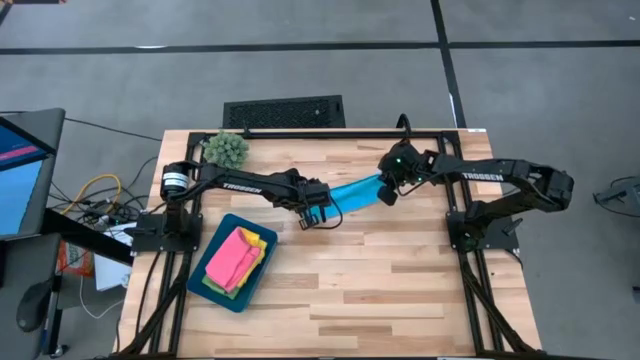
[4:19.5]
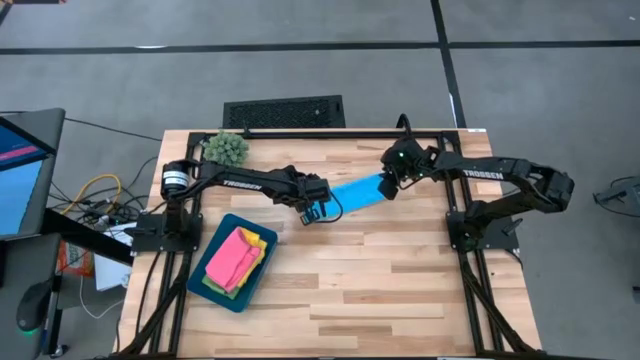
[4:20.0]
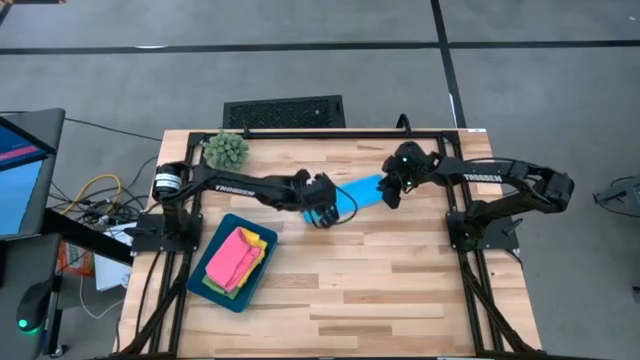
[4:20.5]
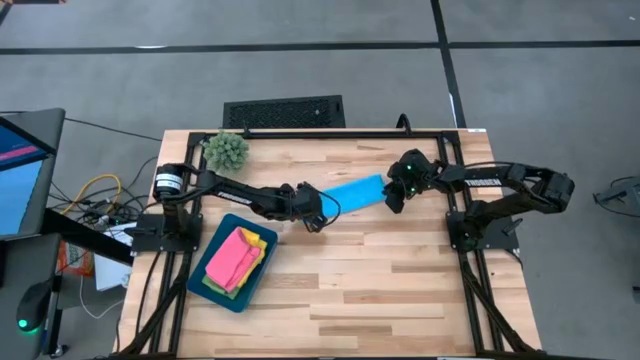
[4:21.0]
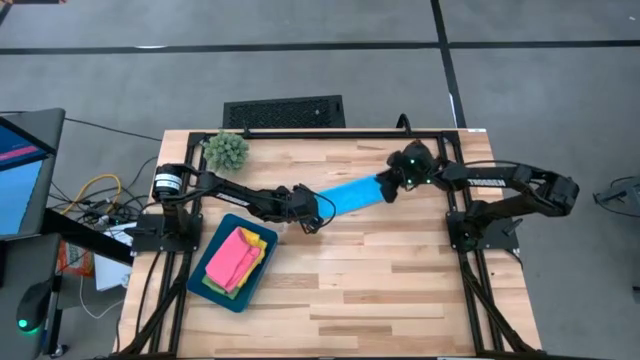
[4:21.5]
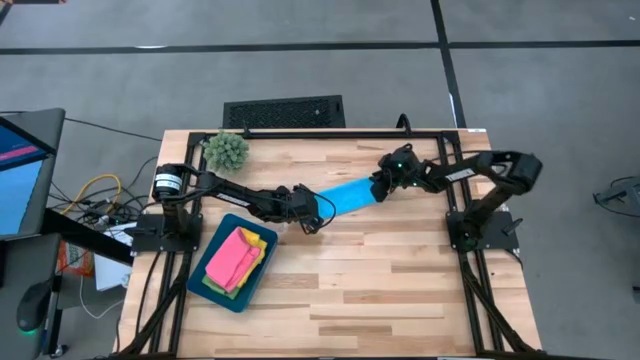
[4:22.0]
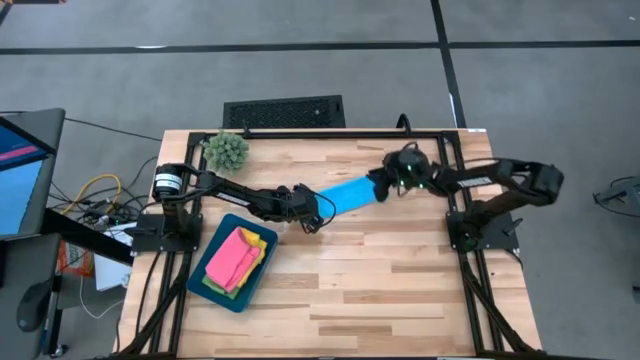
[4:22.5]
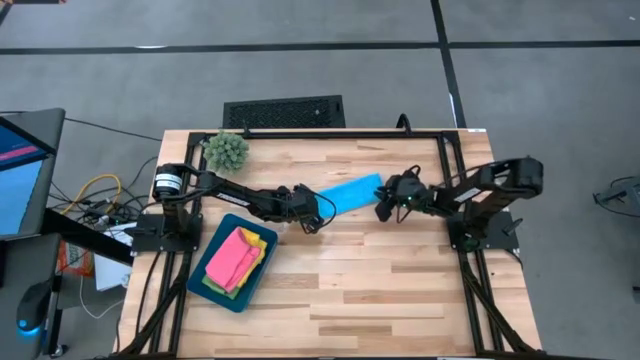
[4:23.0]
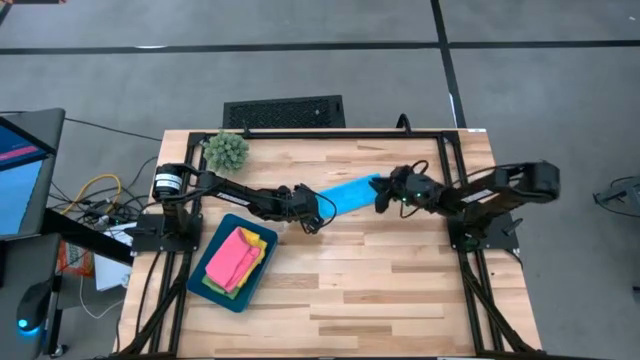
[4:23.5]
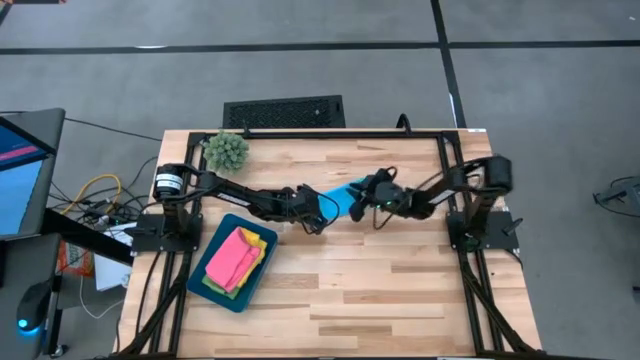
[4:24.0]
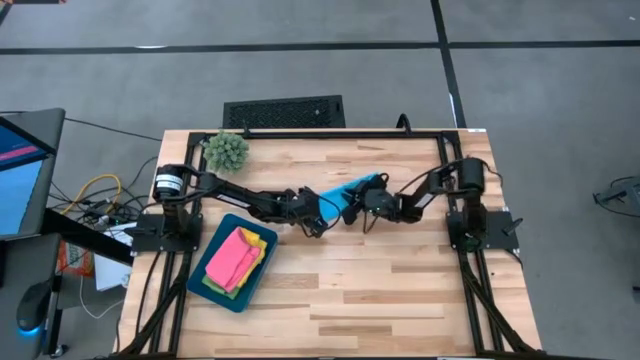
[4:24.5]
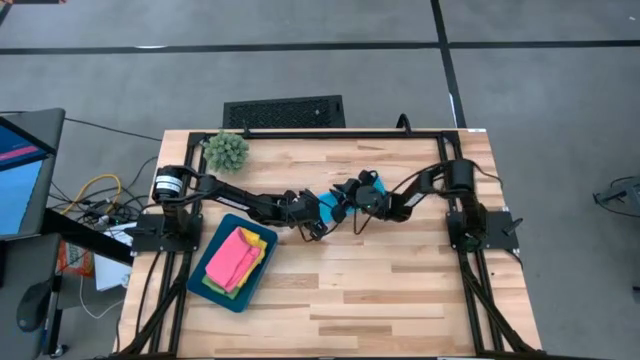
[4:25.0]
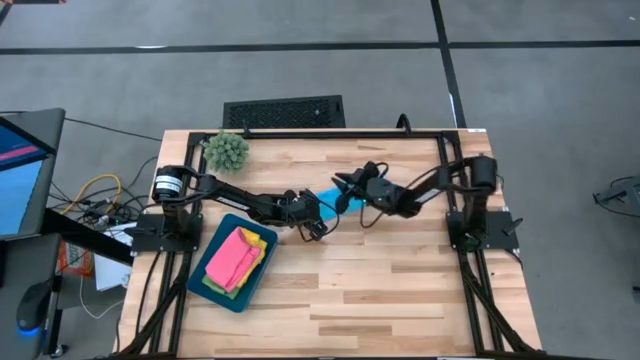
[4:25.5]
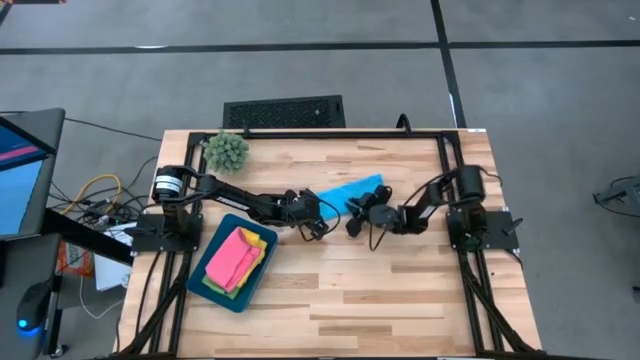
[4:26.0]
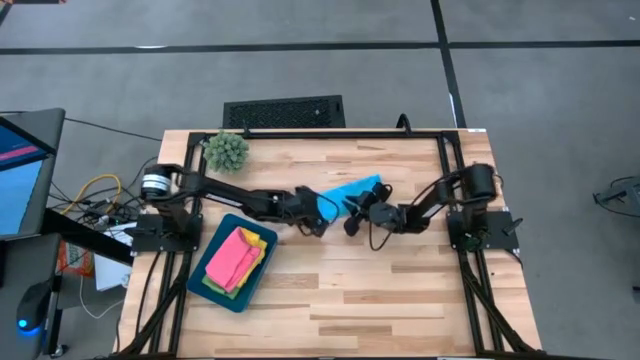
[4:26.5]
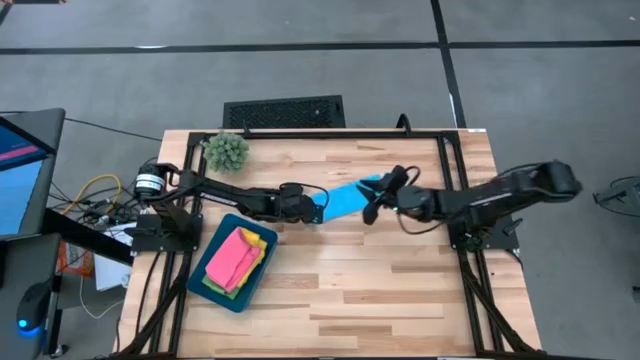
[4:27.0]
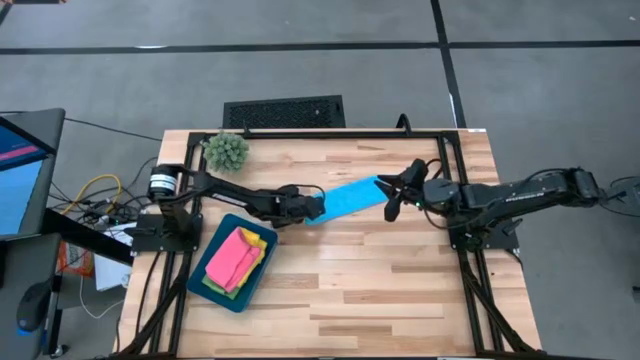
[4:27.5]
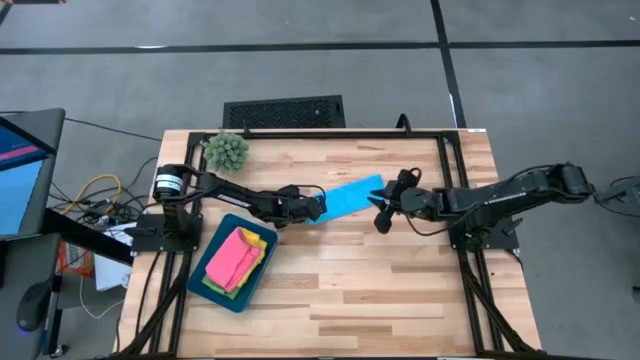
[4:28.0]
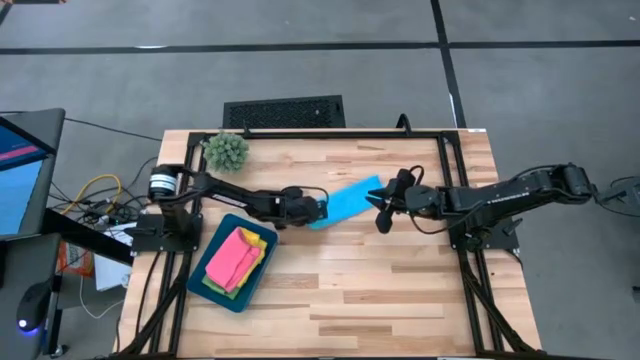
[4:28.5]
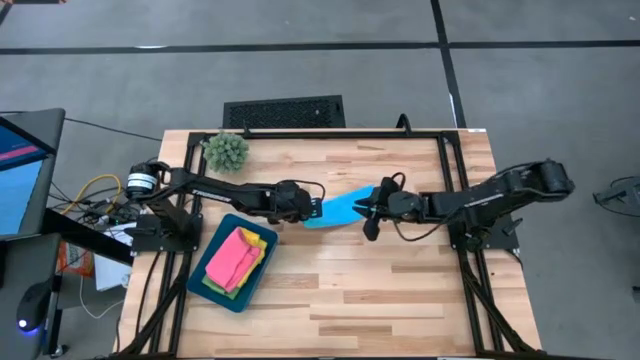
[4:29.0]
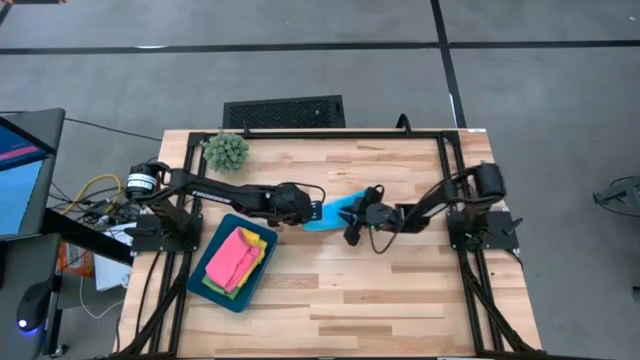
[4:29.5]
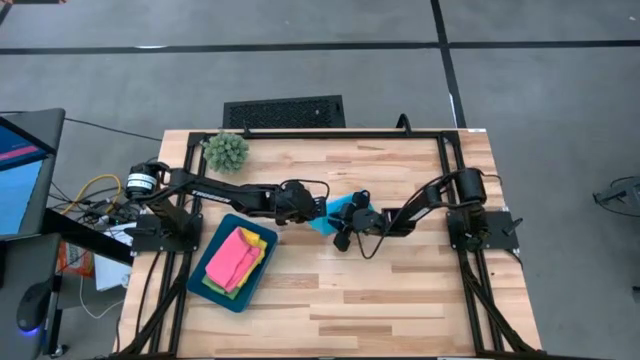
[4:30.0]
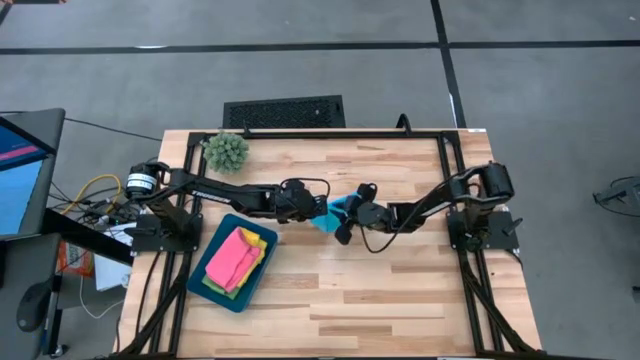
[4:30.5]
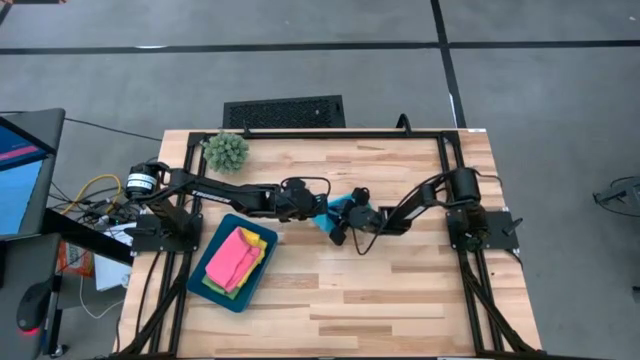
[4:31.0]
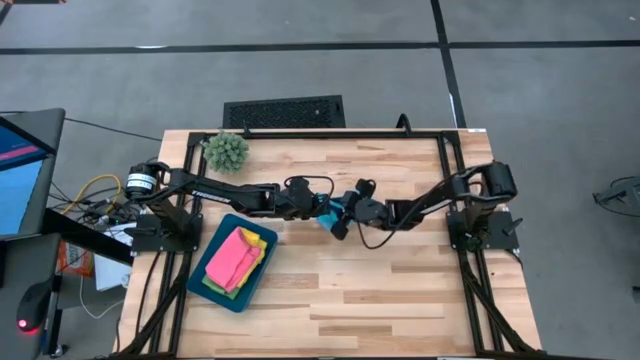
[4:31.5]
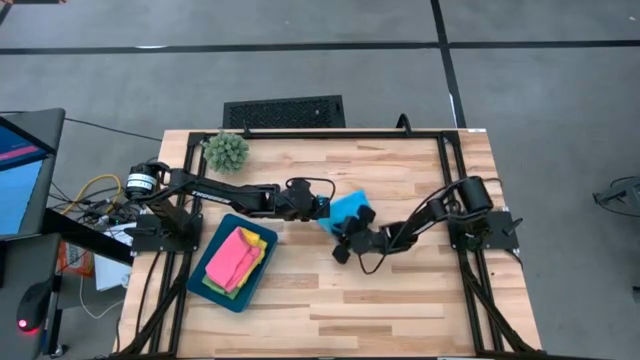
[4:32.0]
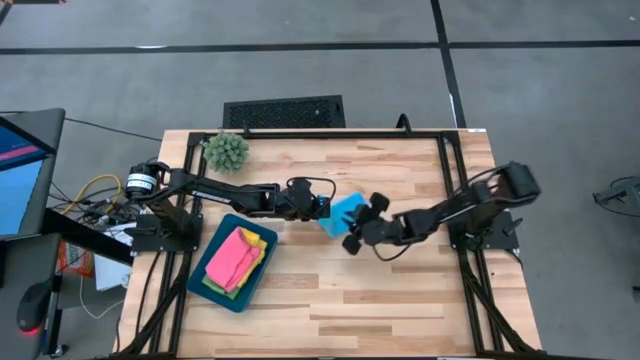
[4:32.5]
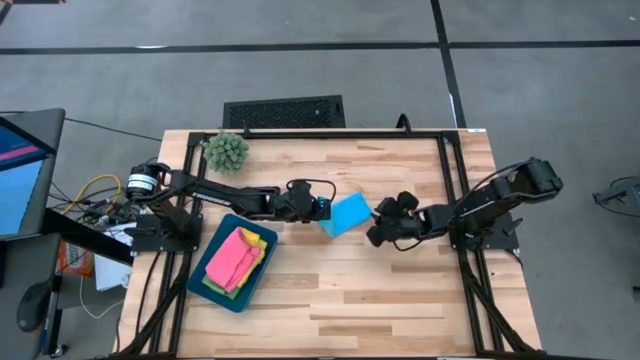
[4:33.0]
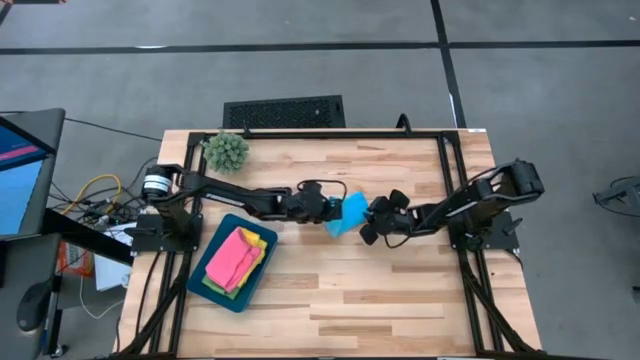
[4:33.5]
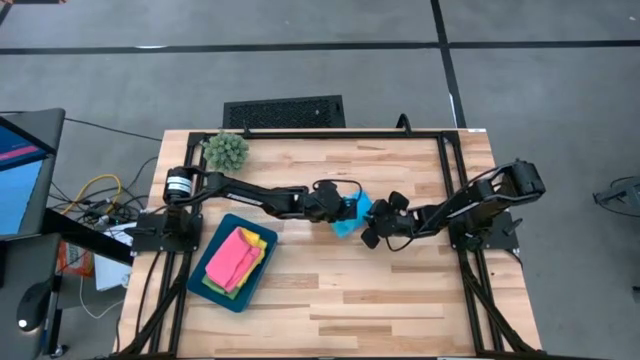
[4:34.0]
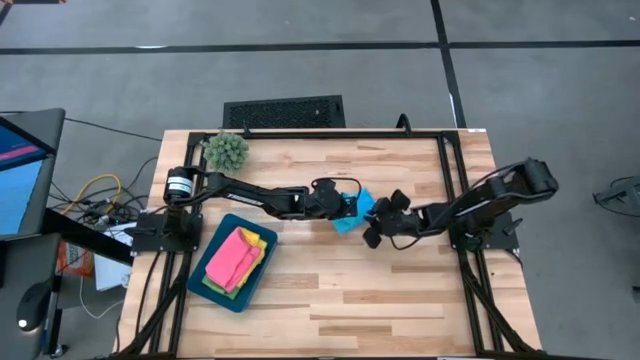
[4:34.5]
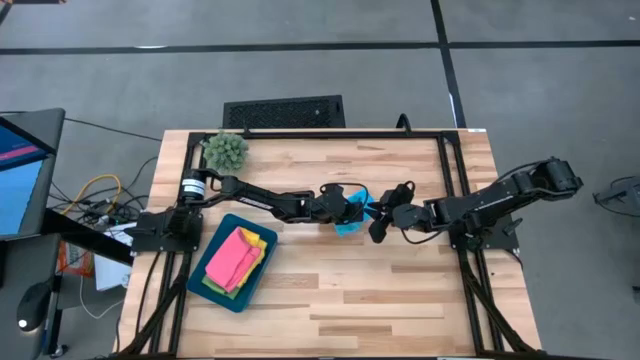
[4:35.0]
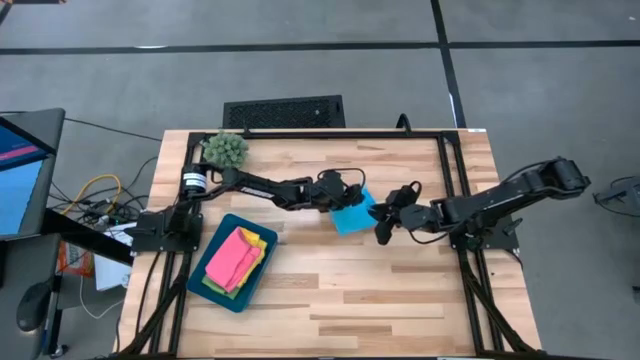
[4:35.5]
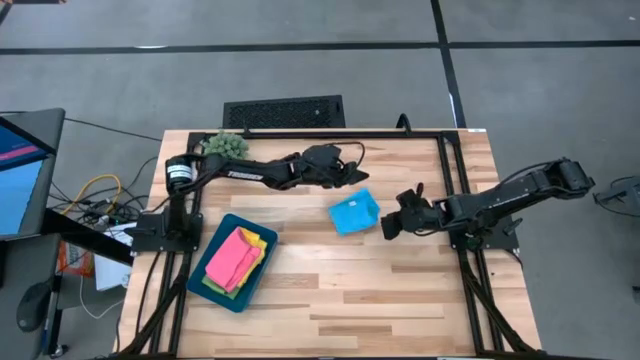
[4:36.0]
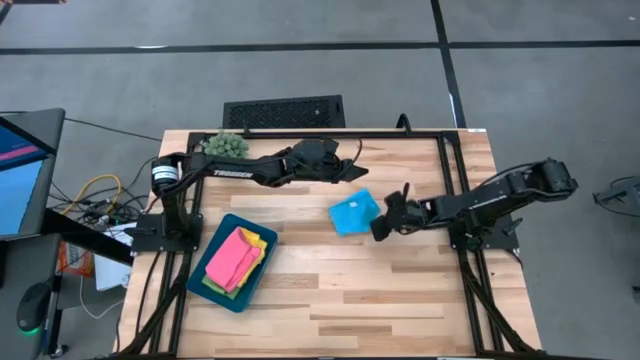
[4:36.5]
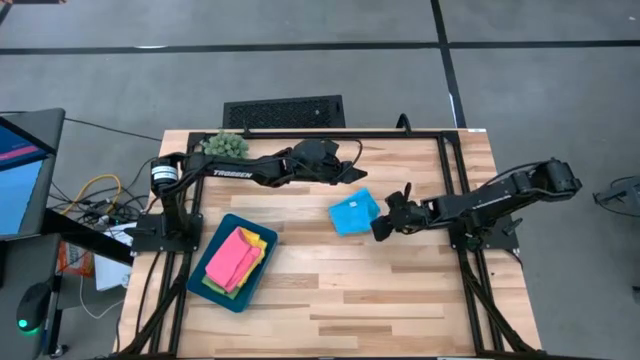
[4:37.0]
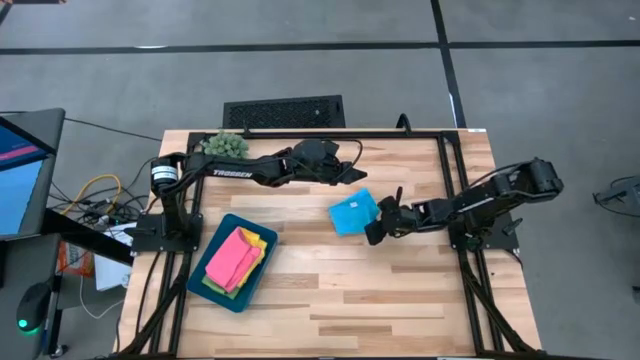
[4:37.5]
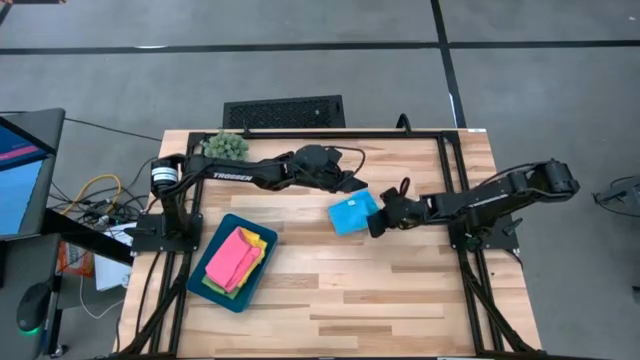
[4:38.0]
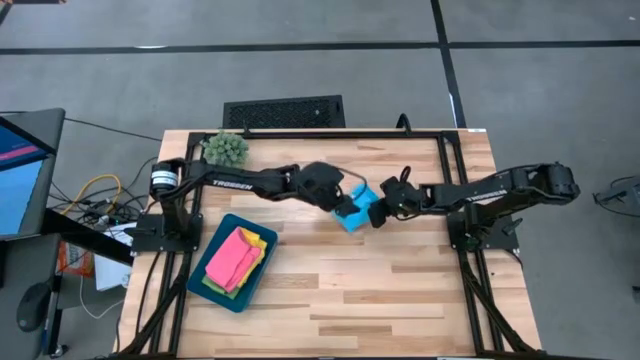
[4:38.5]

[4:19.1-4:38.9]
Task: Fold microfiber towels
Fold the blue microfiber towel

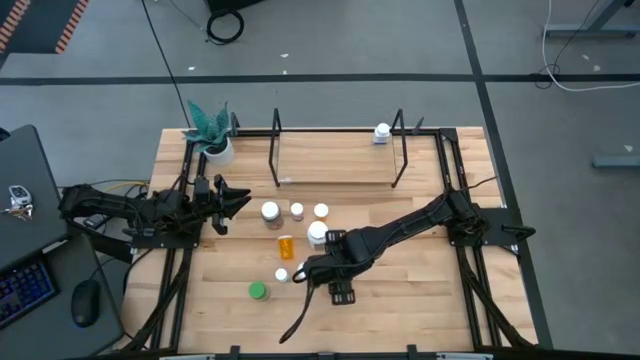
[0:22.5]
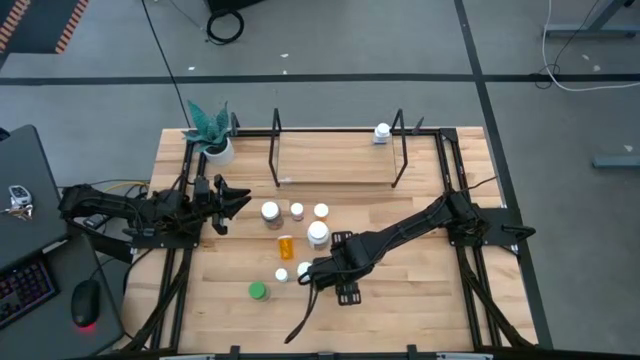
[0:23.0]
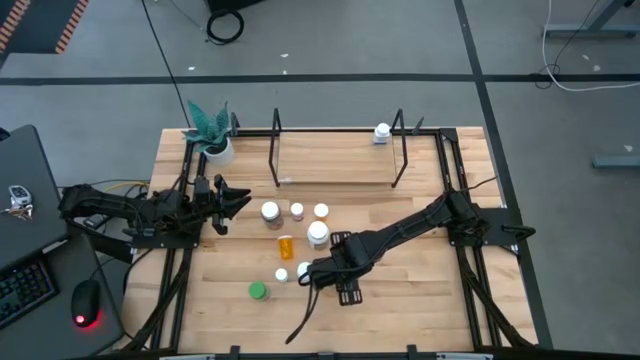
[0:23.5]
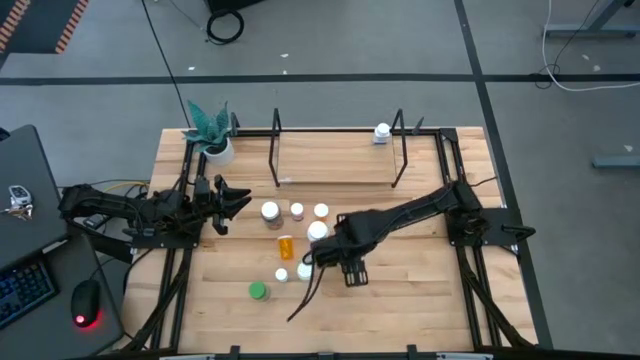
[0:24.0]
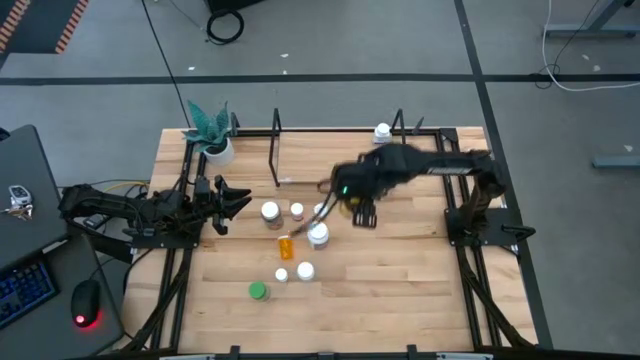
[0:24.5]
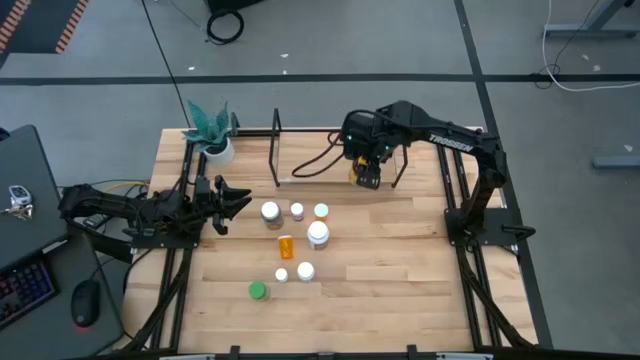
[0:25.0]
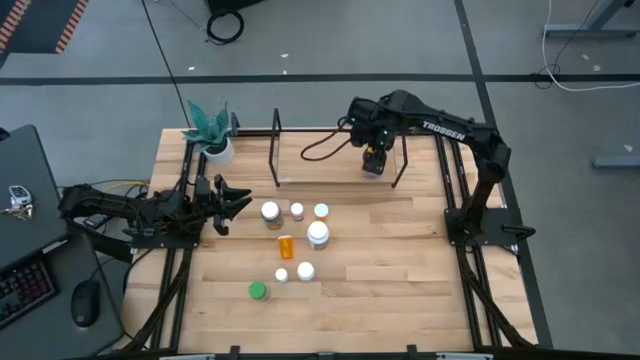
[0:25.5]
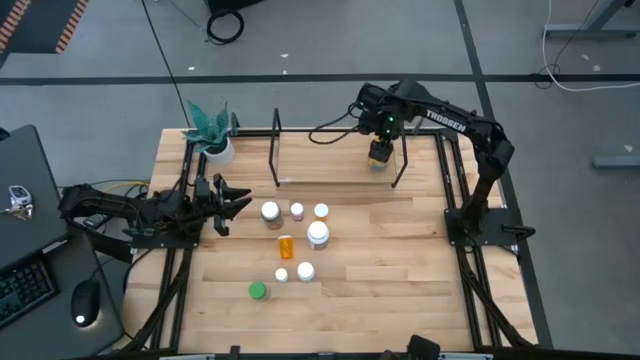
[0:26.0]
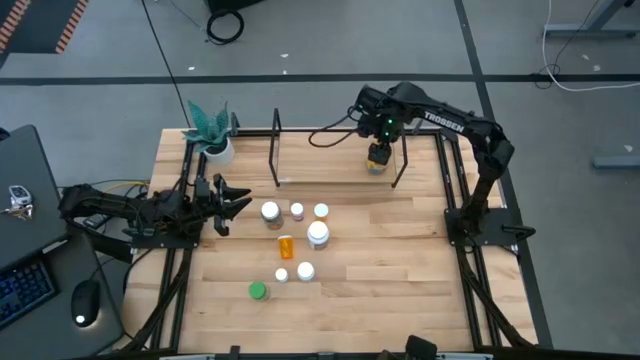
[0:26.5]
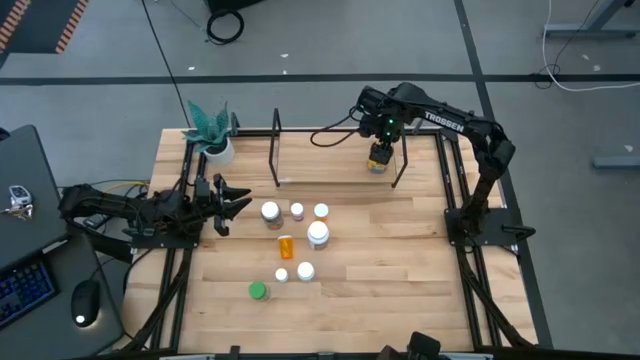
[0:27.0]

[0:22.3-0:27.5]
Task: Pick and place medicine bottles onto shelf by color
Put the yellow pill bottle on the shelf
